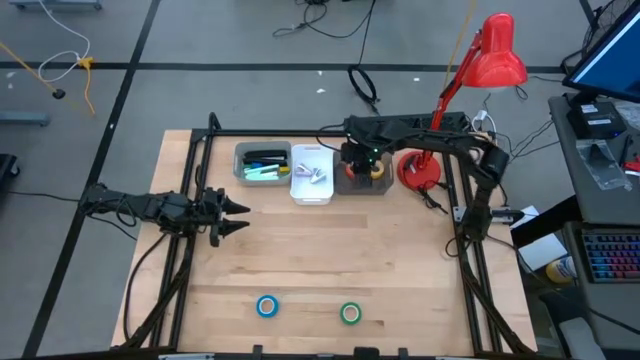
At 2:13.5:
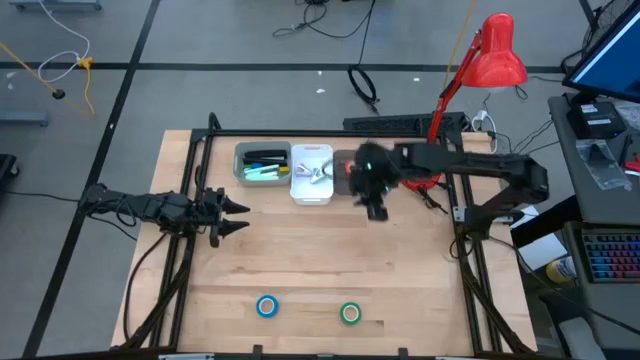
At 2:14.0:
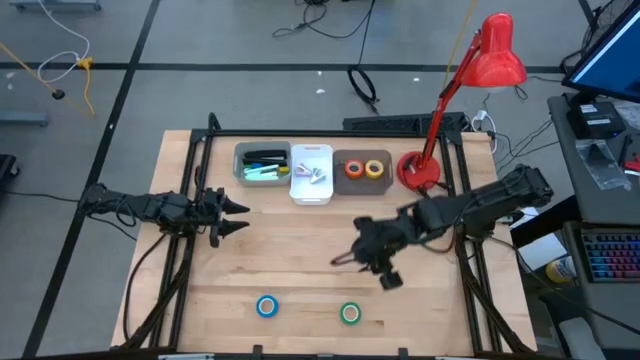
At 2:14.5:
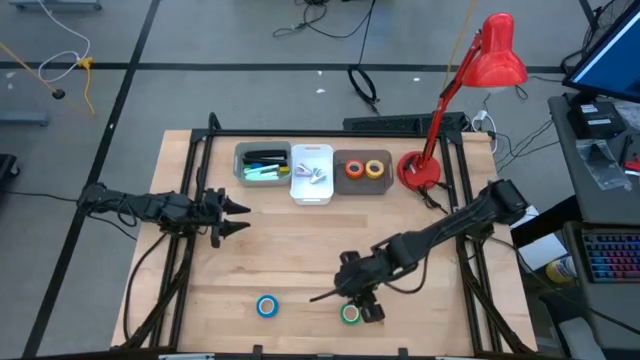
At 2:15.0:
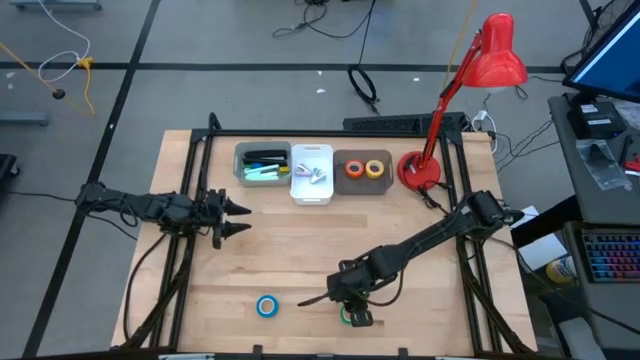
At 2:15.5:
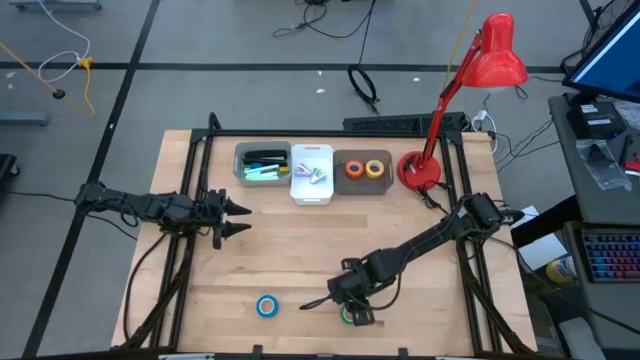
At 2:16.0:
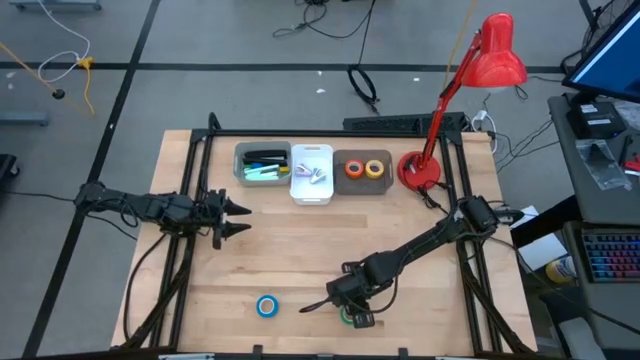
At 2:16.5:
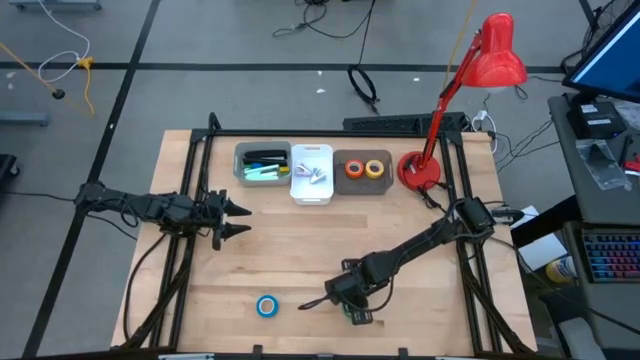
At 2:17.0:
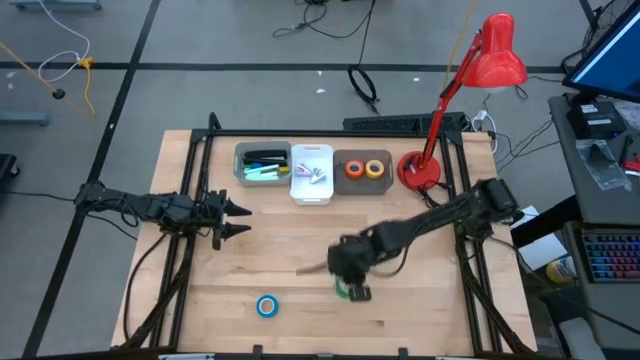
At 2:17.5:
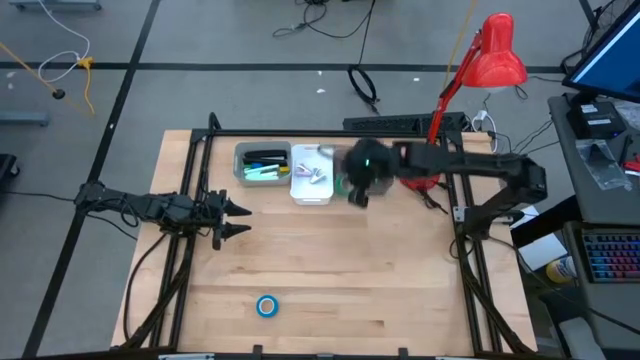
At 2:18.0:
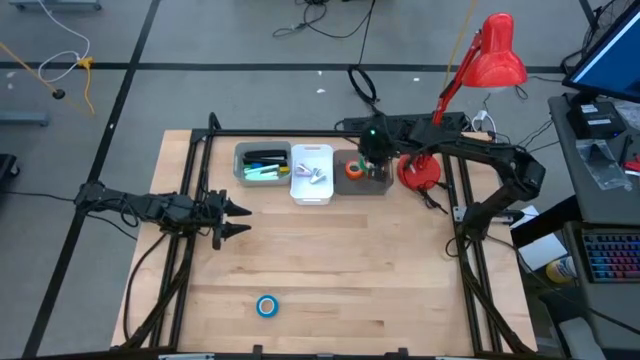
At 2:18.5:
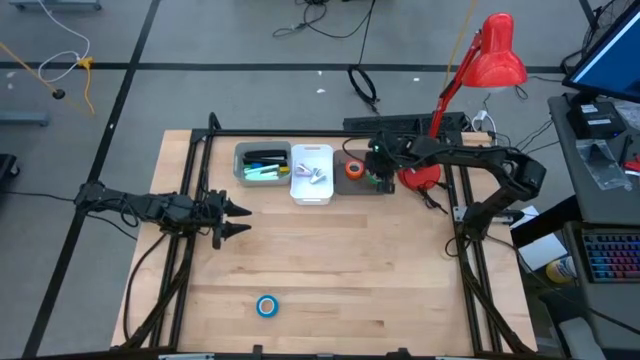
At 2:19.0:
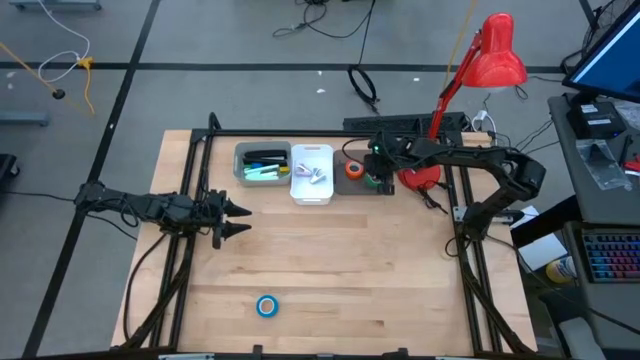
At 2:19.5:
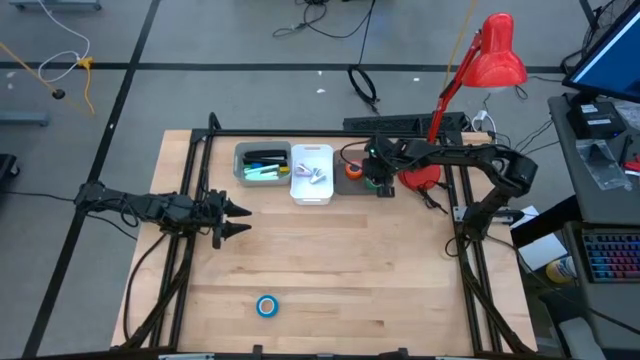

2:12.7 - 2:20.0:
Task: Pick and place Stapler, Stapler remover, tape
Put the green tape into the black bin

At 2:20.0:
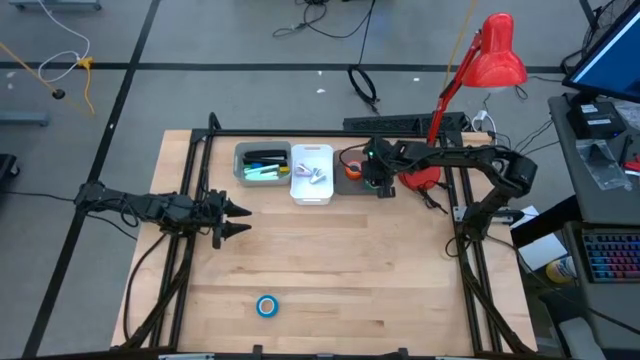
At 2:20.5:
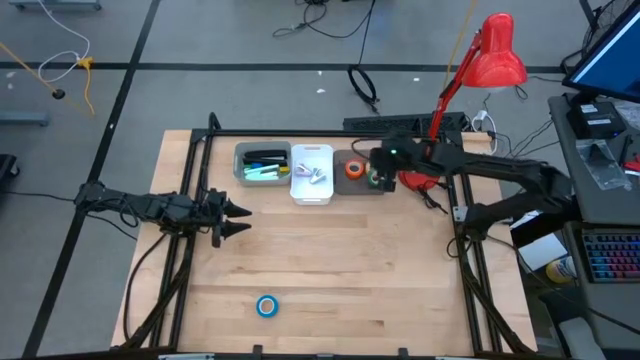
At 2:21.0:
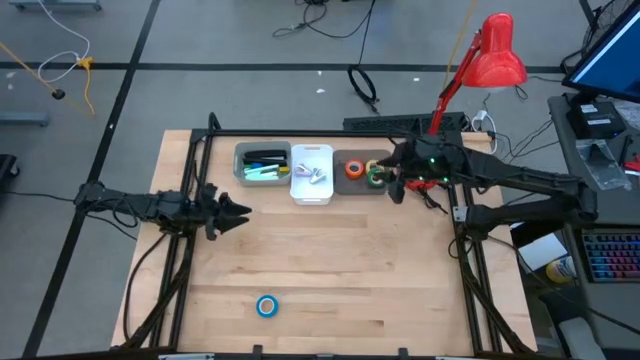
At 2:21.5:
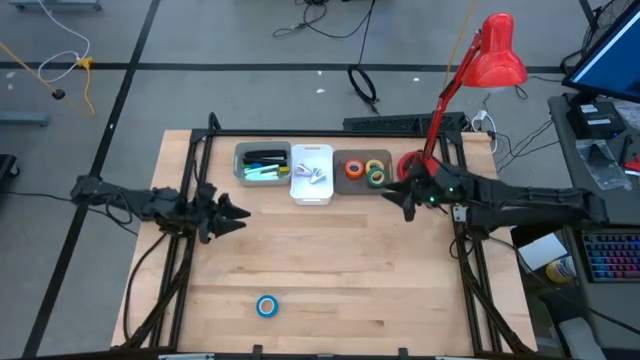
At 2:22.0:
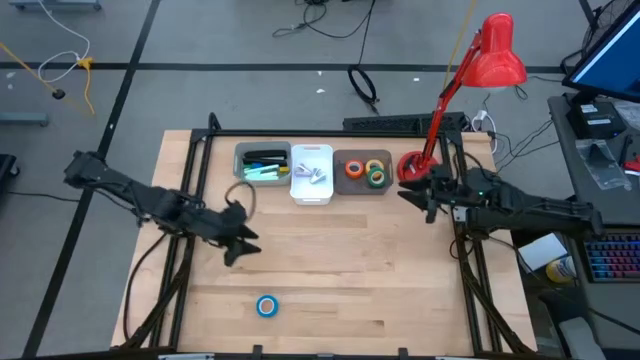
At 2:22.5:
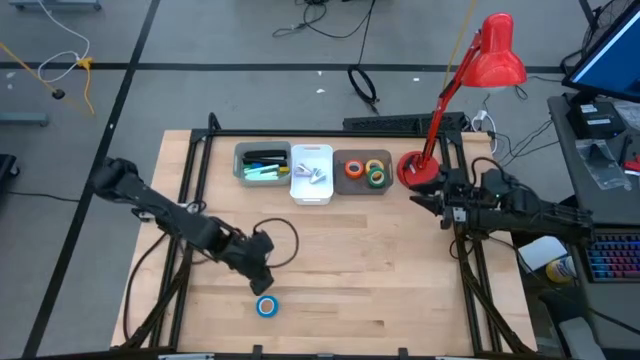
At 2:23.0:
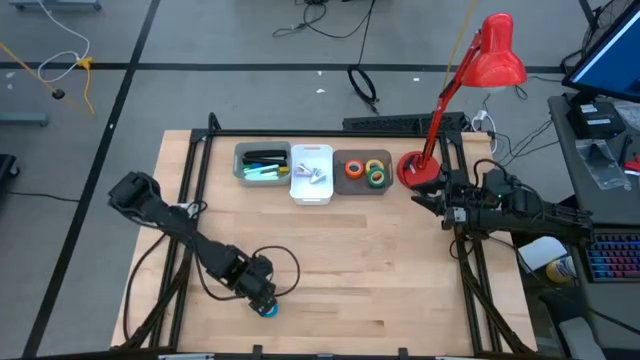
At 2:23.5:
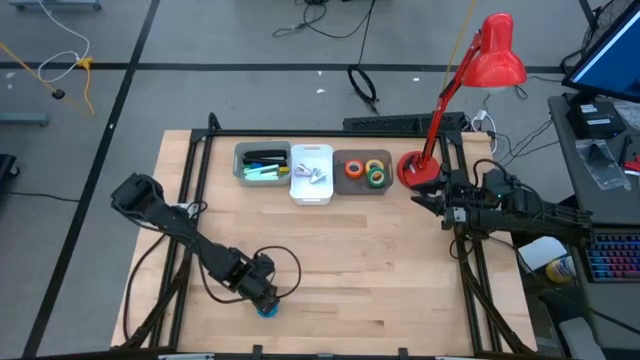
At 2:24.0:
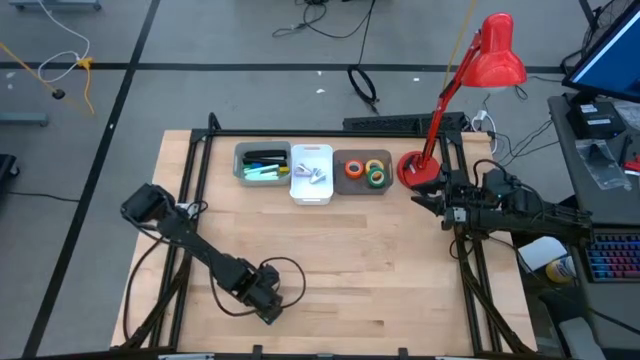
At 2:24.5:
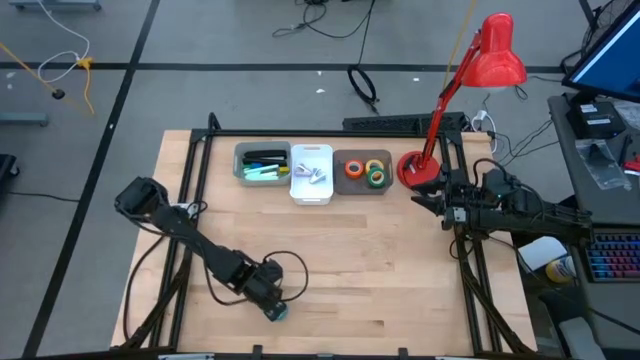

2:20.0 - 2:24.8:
Put the blue tape into the black bin

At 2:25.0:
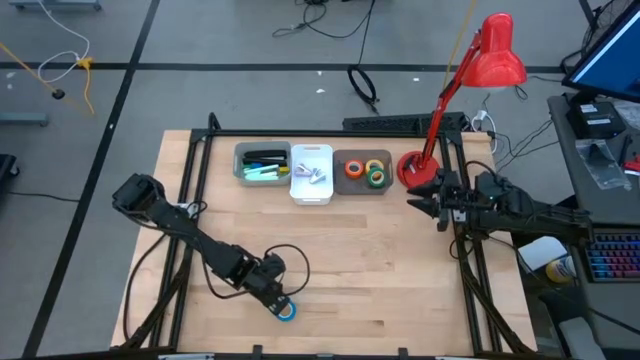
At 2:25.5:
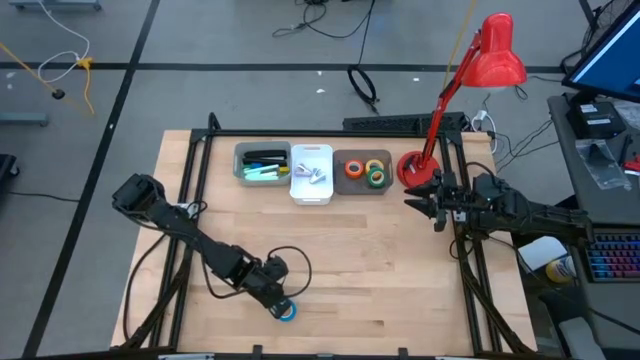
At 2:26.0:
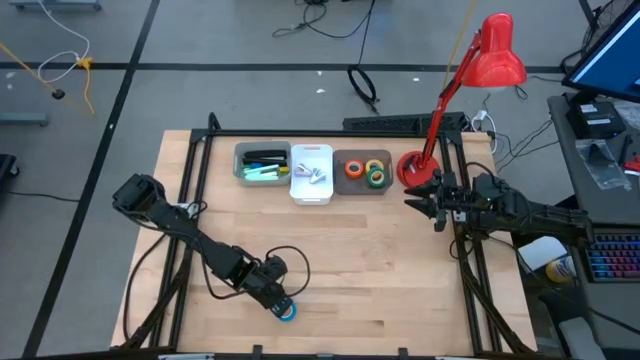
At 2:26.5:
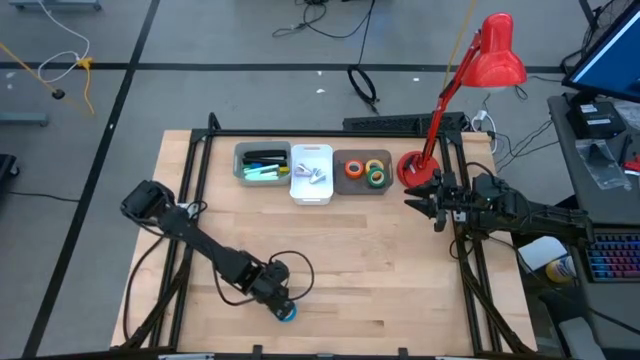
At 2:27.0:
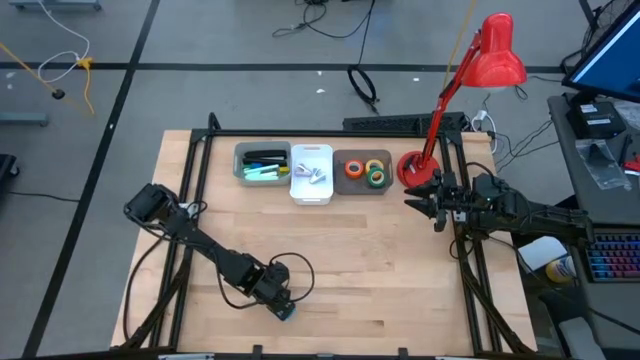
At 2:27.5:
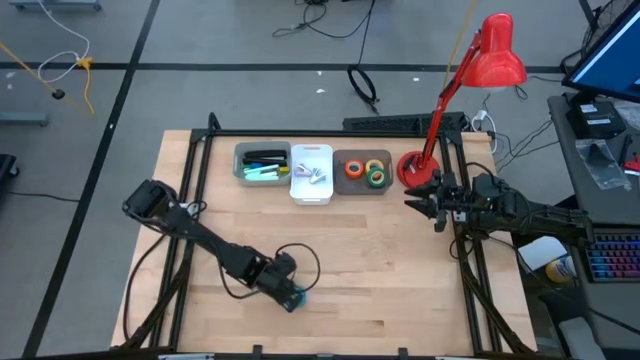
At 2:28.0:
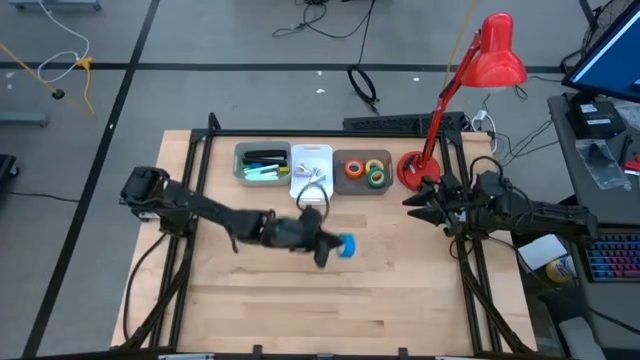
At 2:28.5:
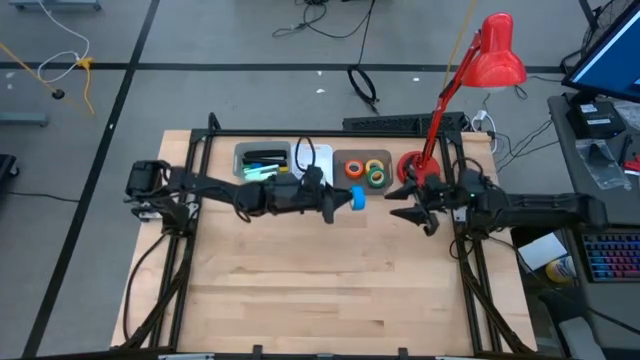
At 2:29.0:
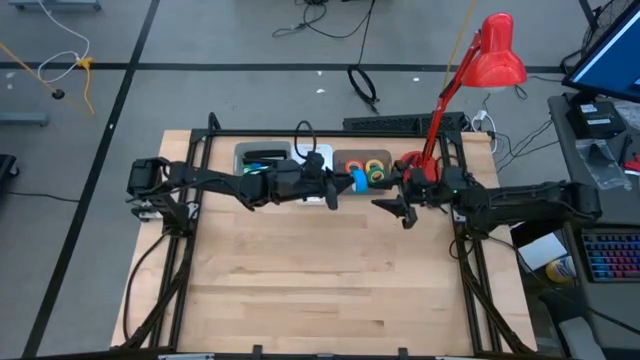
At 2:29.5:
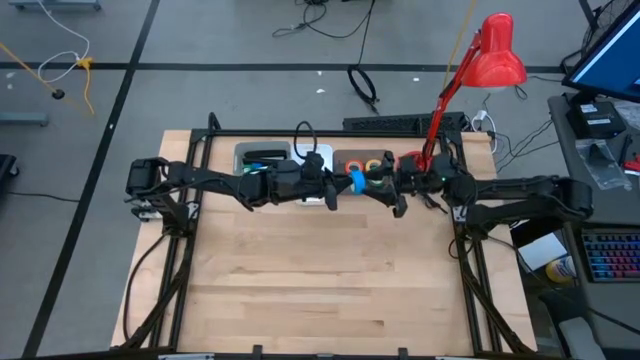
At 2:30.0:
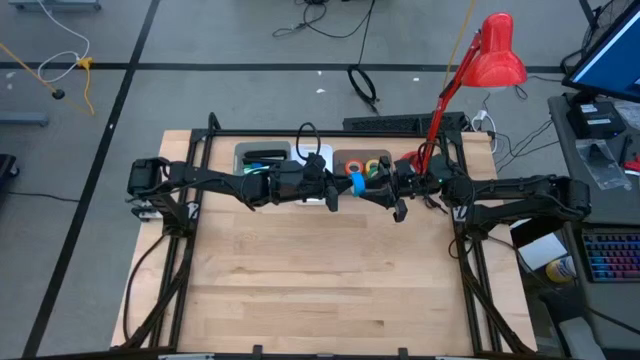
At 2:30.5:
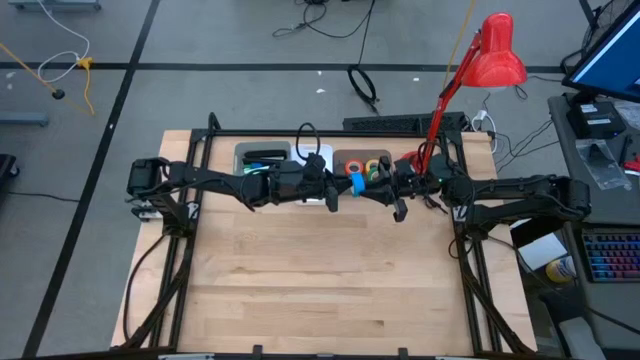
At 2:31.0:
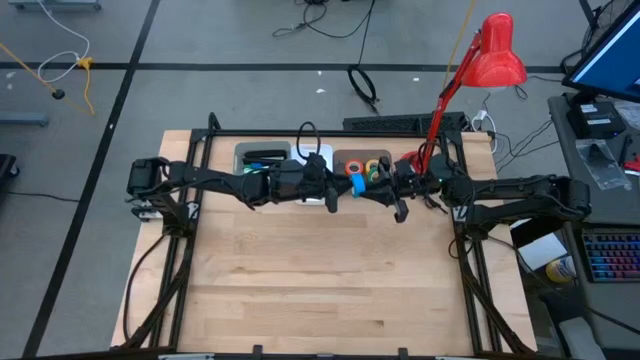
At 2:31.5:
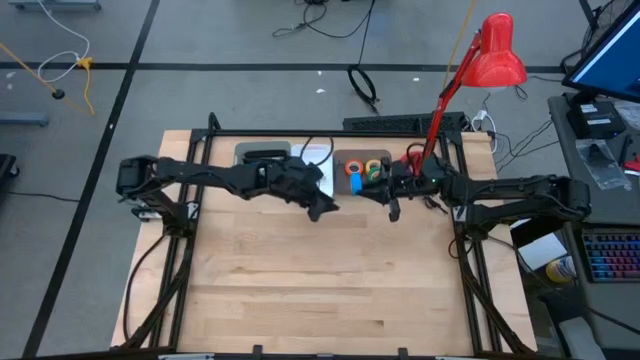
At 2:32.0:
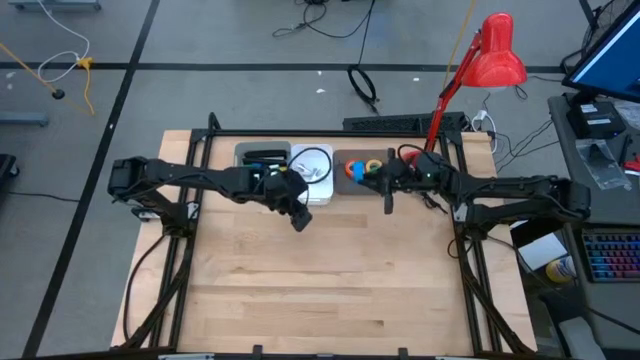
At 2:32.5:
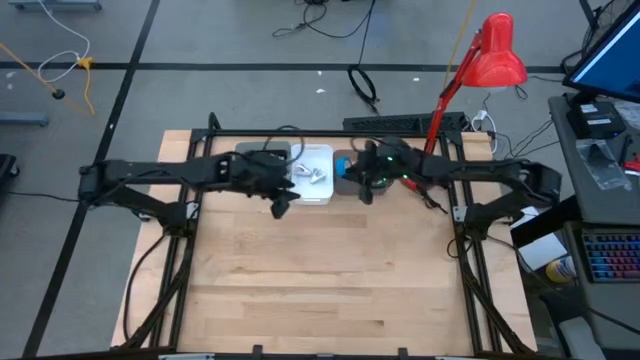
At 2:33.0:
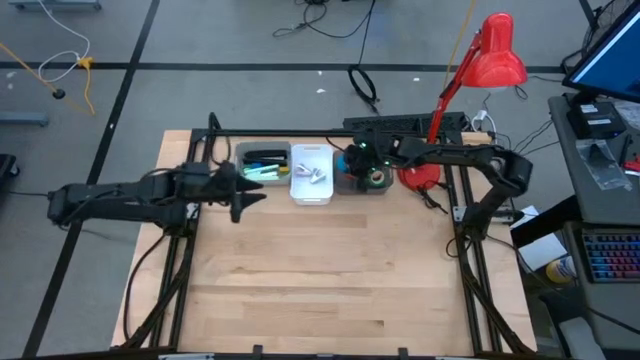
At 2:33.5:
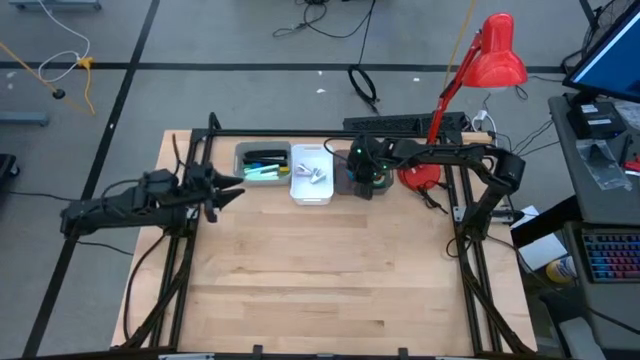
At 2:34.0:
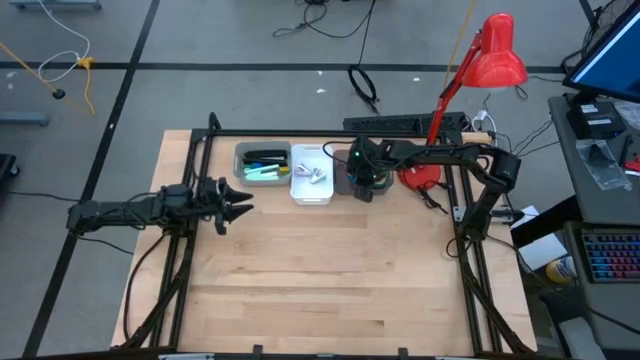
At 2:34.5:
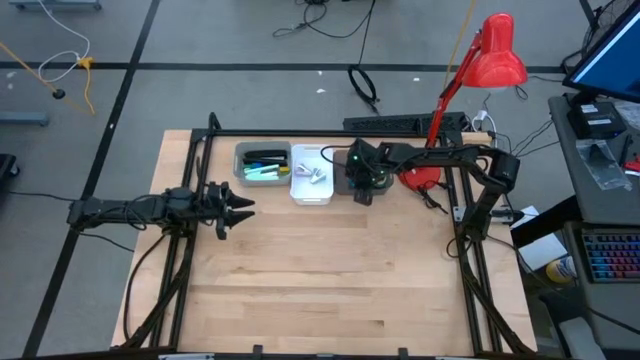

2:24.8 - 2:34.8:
Put the blue tape into the black bin
